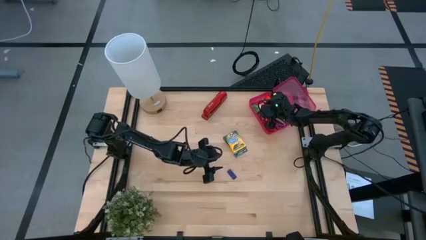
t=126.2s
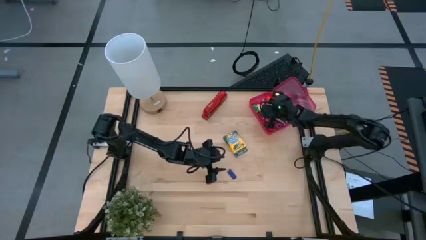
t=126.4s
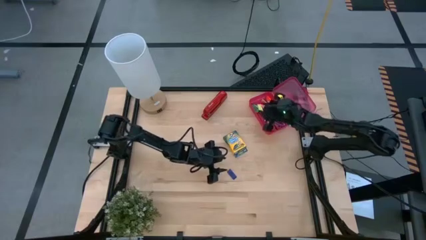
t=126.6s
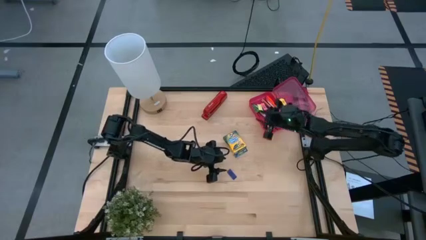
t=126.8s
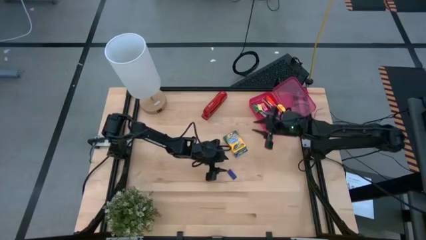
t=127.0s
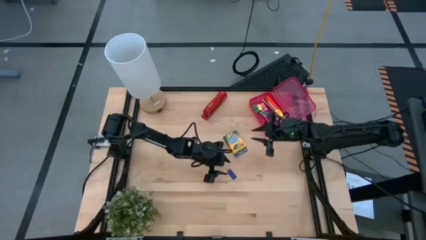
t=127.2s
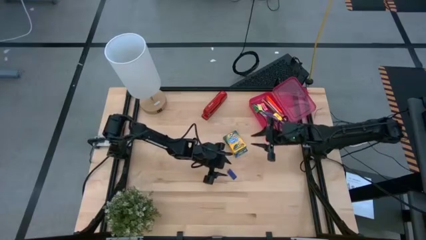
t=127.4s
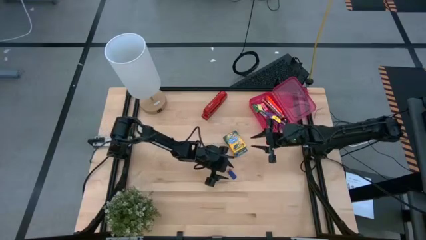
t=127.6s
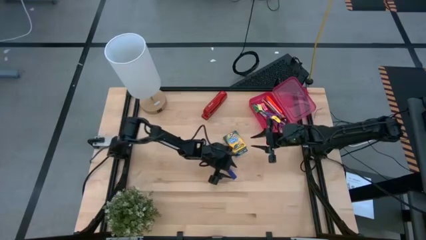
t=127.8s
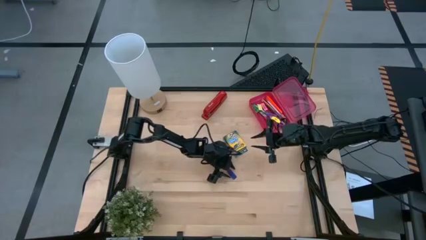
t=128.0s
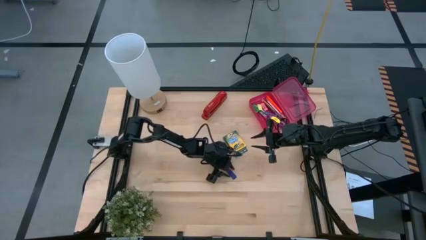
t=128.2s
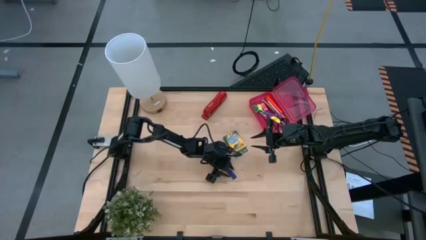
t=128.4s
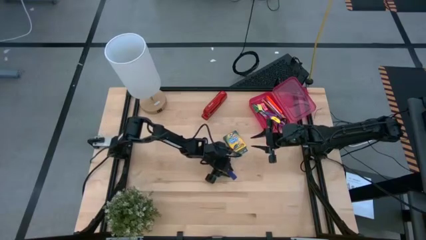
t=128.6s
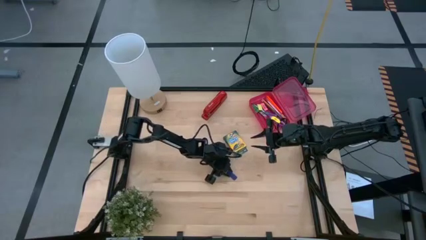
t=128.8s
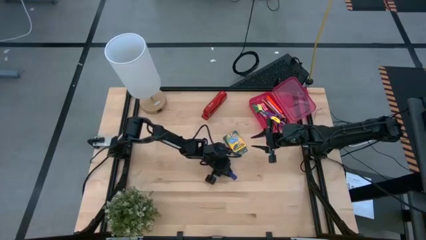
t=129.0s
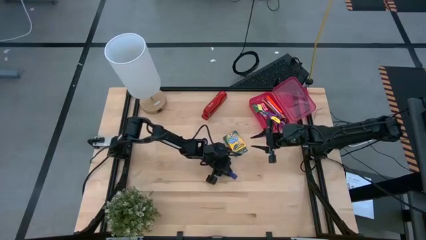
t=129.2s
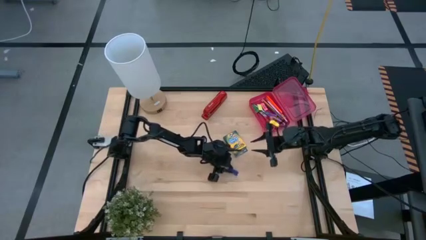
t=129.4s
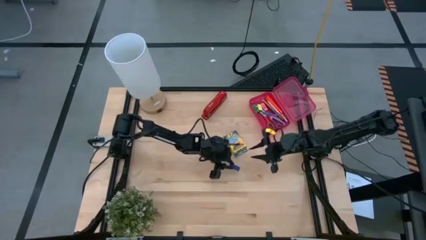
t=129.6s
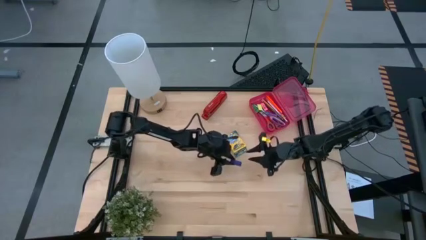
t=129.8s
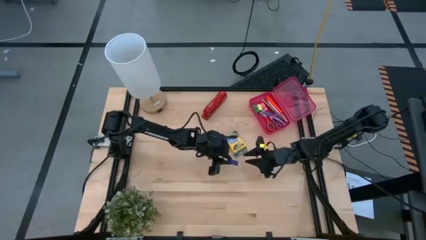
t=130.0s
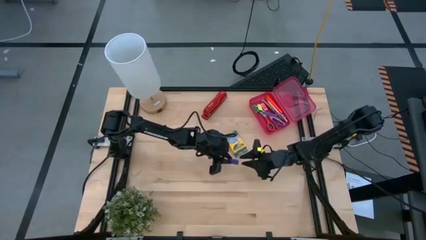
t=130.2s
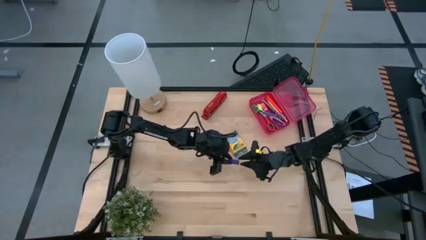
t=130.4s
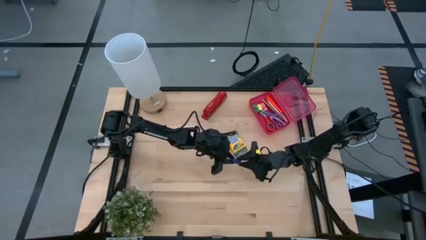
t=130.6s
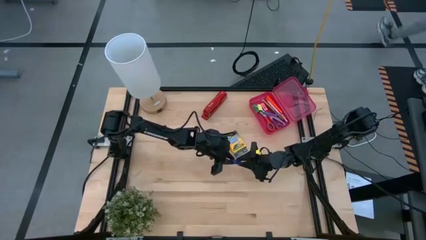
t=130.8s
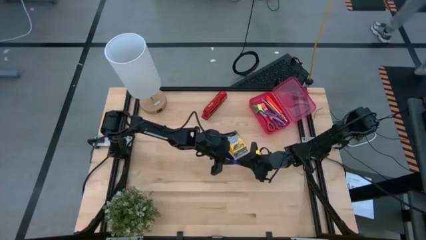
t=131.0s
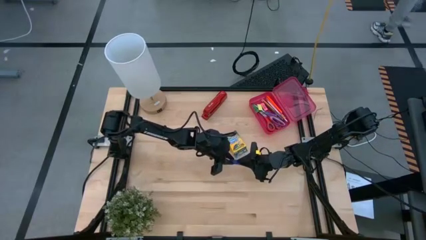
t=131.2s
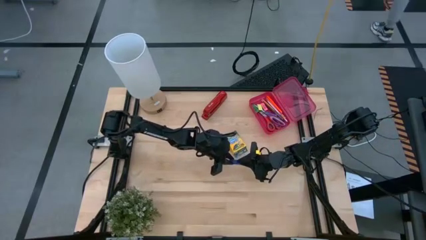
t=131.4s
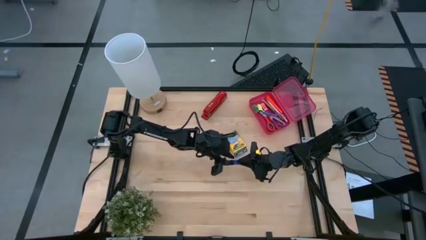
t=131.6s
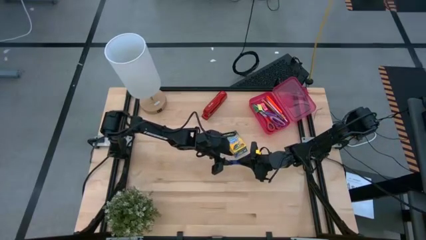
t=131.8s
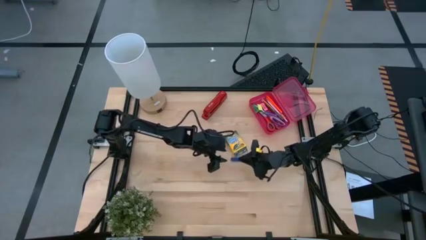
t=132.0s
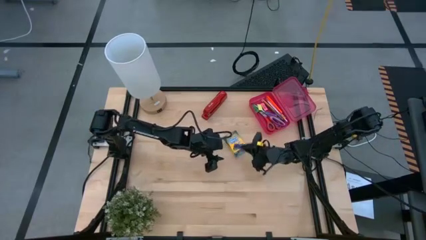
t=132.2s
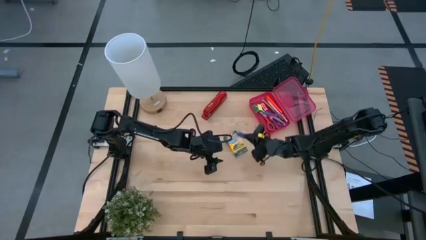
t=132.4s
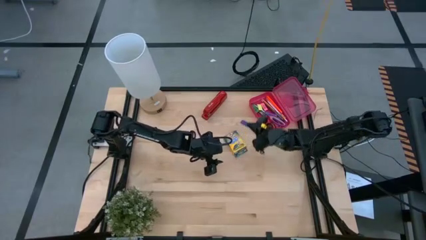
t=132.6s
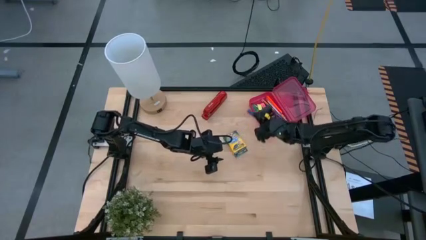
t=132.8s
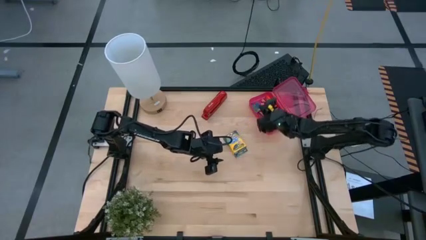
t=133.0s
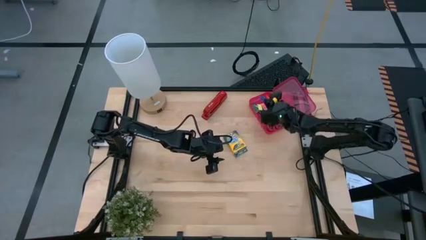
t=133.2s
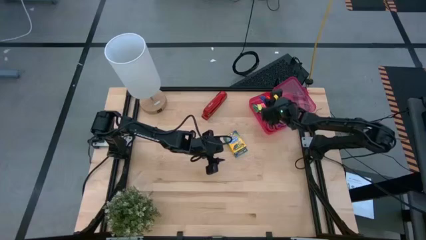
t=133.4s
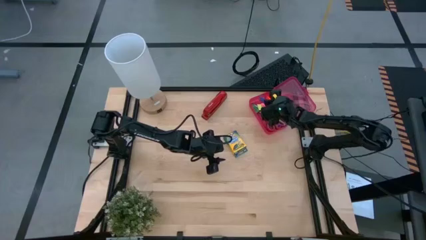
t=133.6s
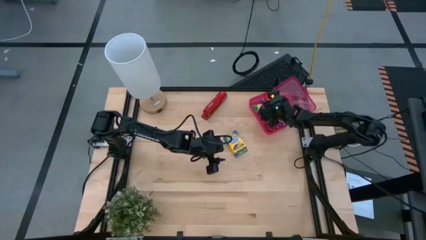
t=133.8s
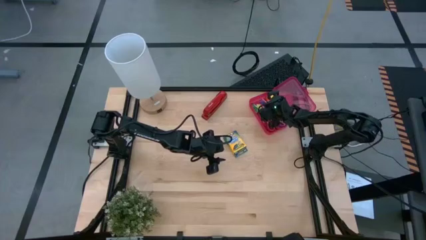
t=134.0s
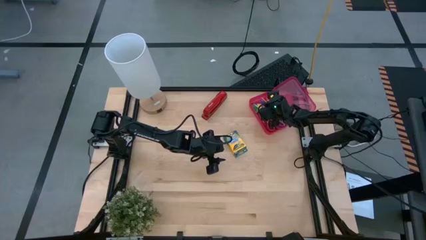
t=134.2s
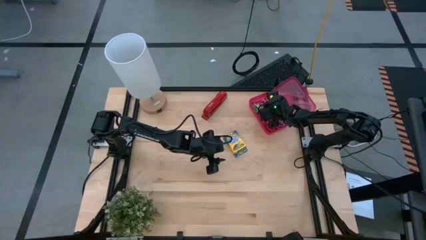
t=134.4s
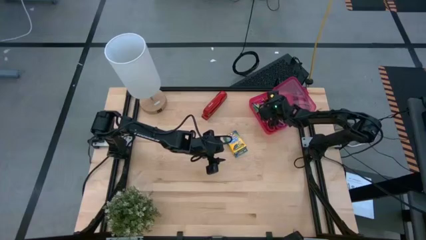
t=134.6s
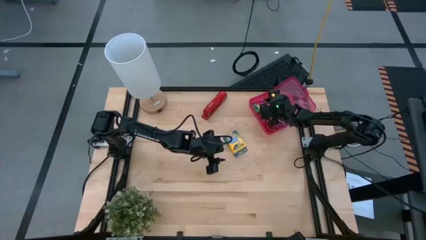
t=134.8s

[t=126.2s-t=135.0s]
Task: Pack school essentials
Put the blue eraser into the pink supply box

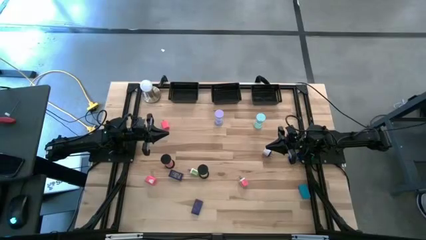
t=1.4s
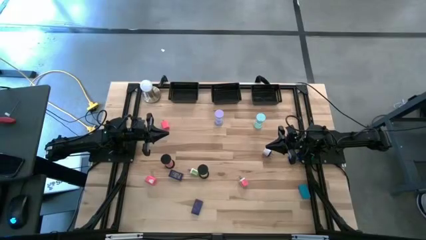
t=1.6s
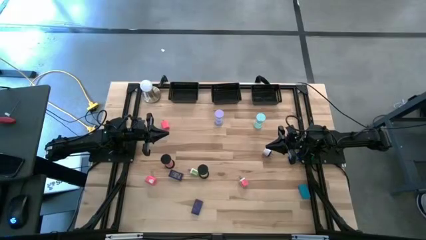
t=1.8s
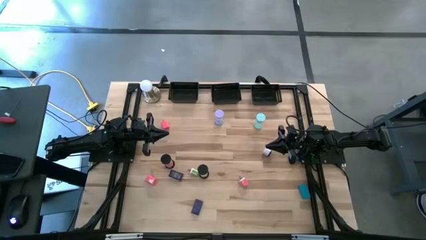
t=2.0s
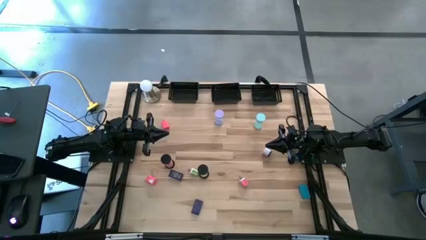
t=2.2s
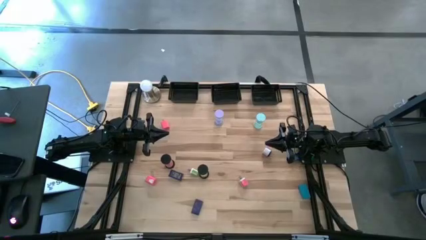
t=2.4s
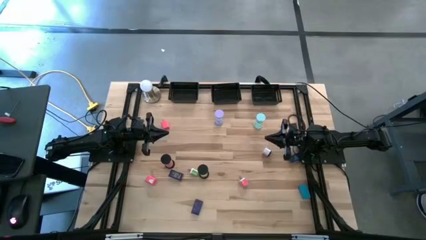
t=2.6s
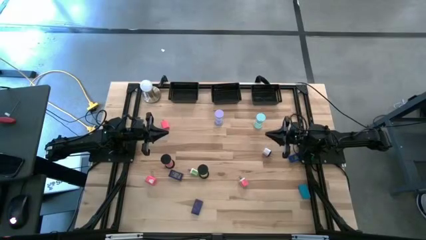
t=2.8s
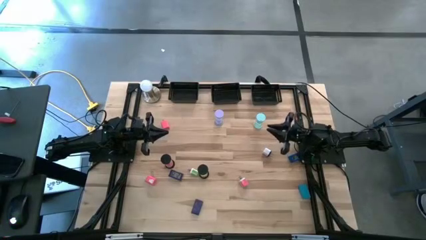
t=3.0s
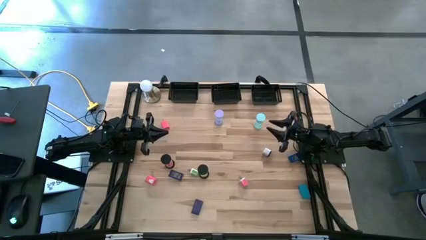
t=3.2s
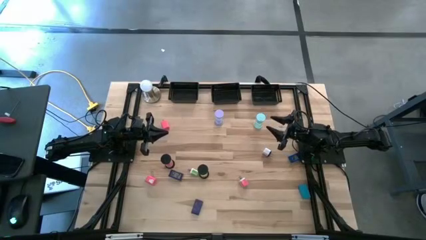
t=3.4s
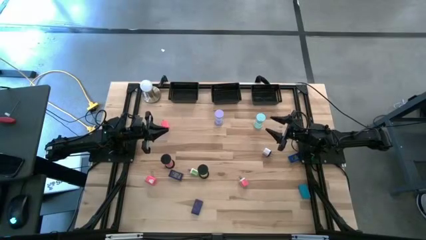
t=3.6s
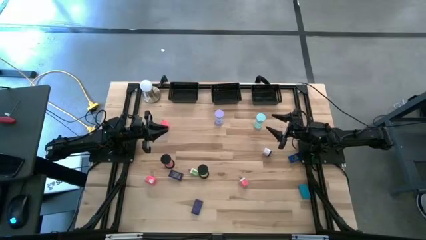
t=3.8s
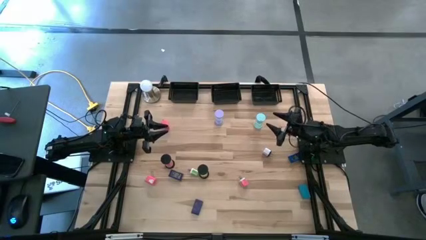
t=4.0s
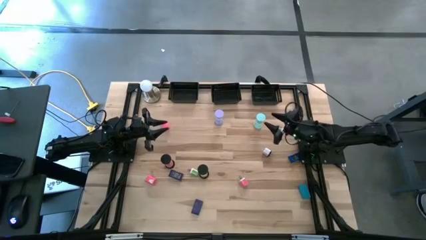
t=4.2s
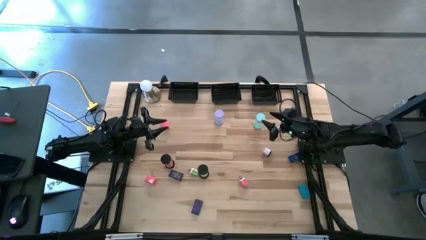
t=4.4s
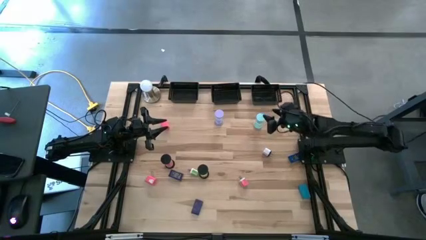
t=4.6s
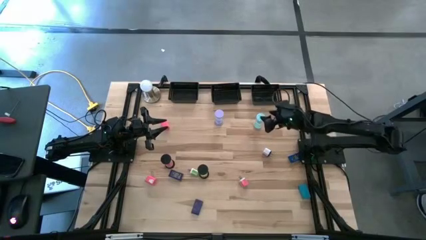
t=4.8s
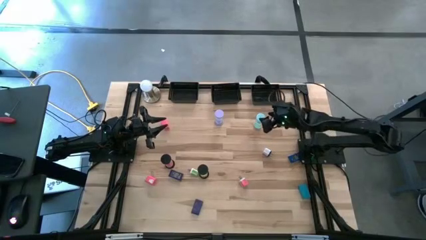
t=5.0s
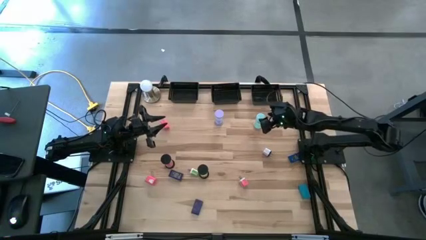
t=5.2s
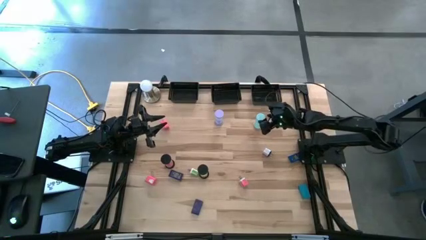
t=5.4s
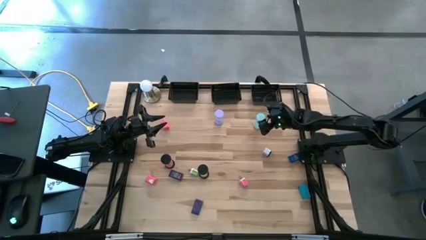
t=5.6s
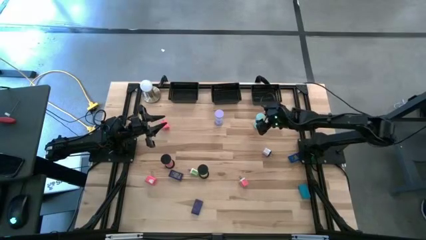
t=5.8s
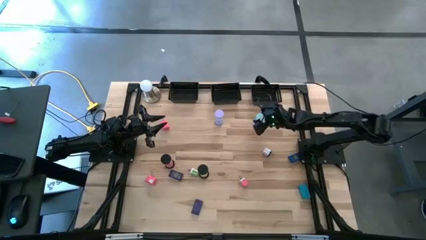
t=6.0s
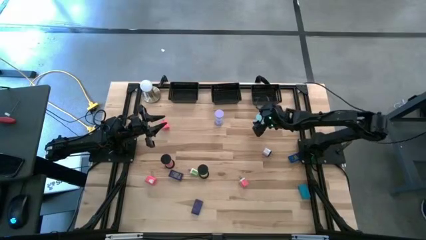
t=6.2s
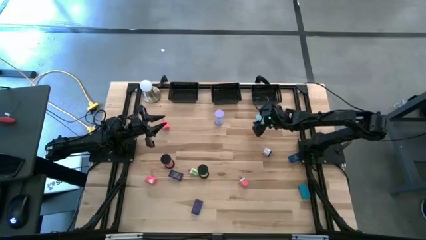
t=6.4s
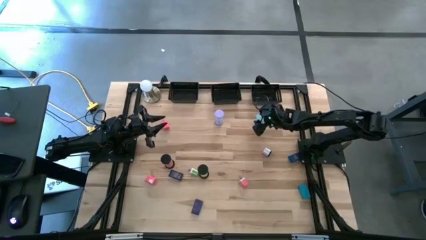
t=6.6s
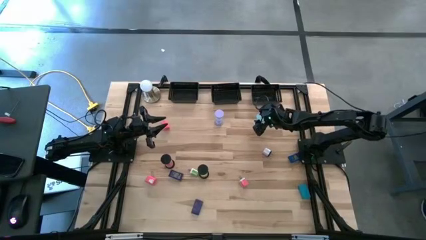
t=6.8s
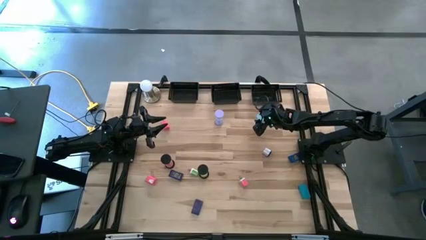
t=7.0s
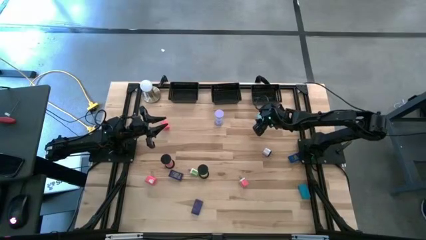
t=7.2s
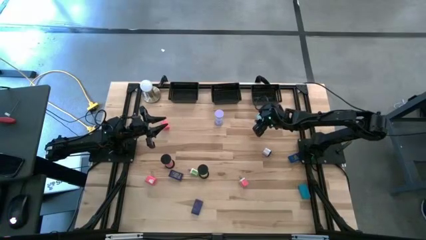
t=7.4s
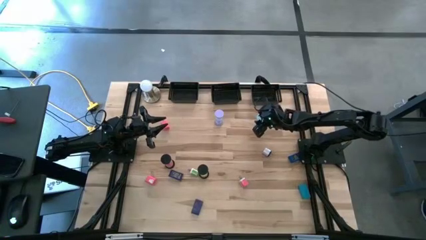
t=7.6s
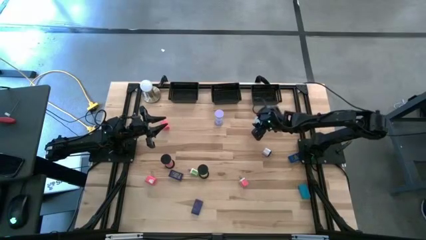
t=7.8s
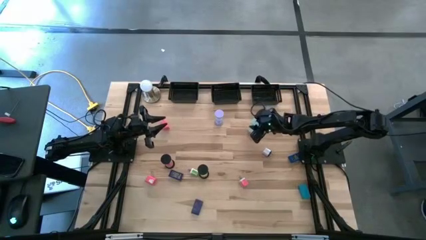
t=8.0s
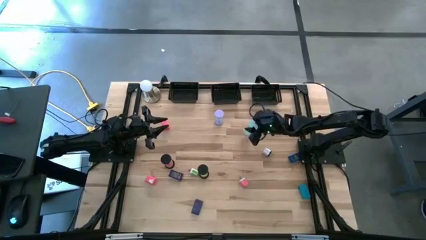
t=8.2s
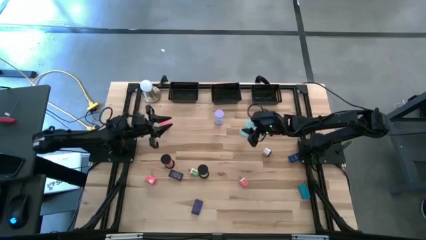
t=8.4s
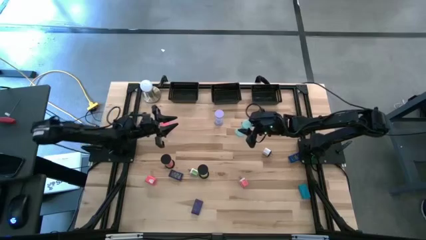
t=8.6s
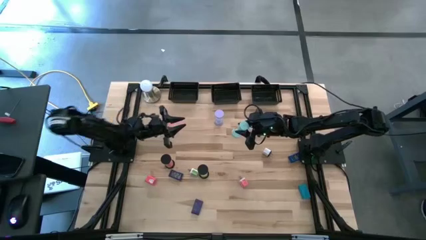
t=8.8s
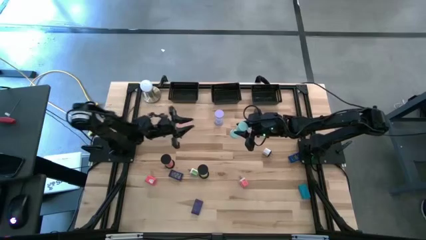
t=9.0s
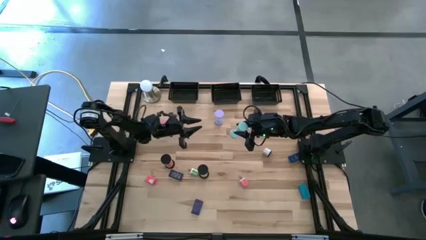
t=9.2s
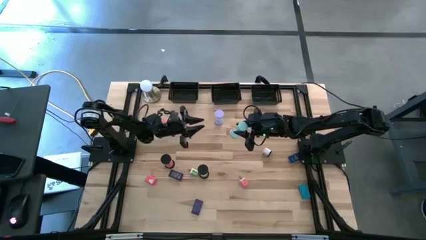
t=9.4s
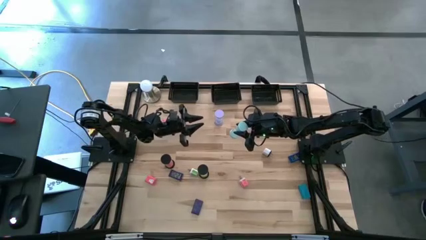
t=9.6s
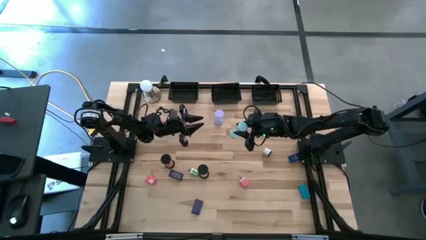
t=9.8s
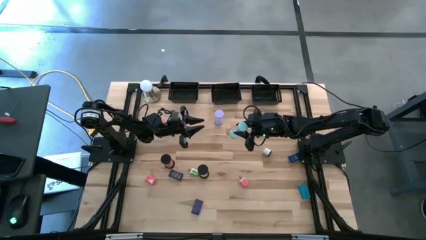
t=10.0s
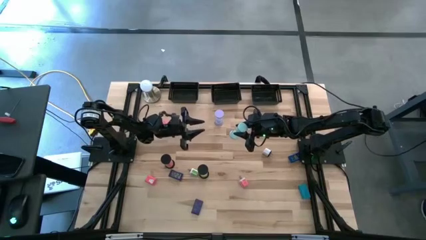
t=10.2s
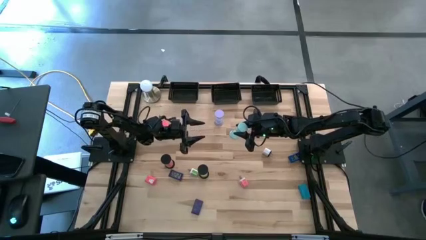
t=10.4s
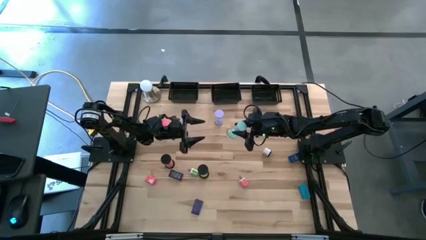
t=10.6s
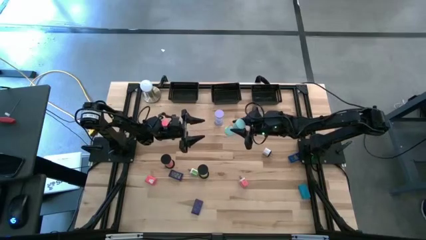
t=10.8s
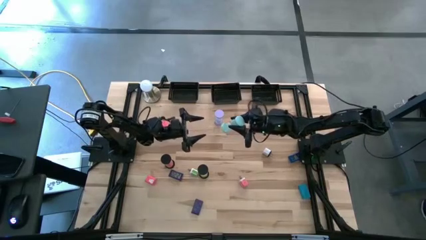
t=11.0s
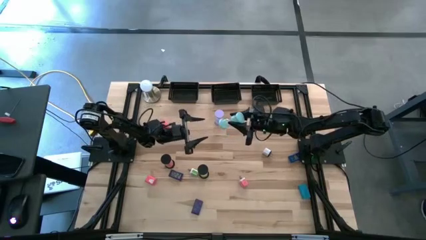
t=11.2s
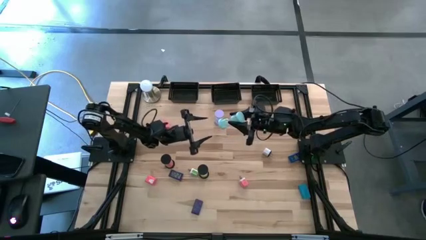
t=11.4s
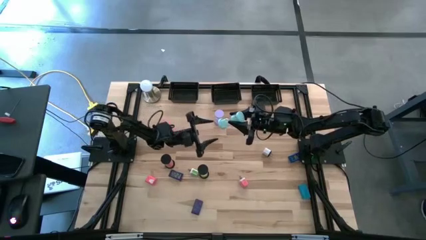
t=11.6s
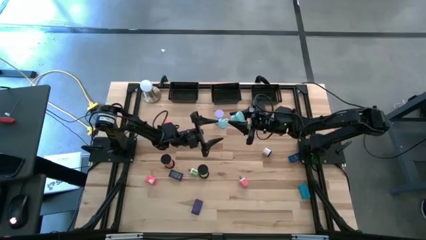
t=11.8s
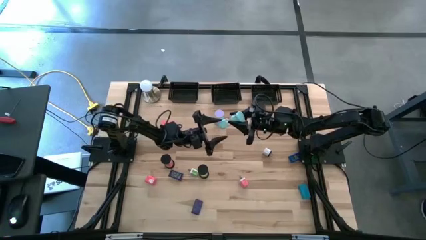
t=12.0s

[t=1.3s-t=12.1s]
Task: Pick & Place Office items
Put the light green hourglass into the left black bin
